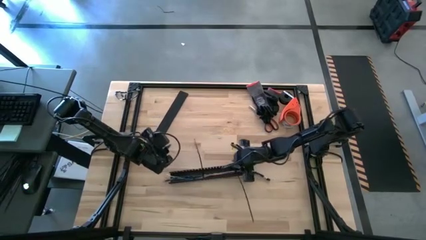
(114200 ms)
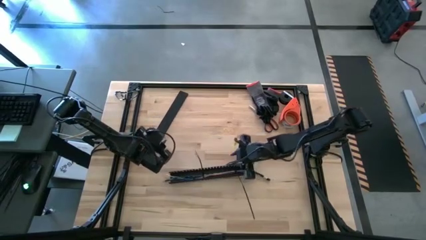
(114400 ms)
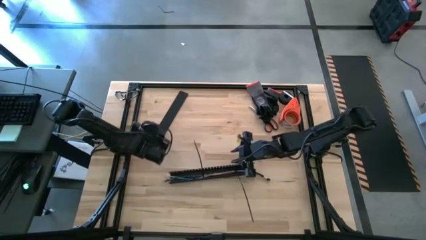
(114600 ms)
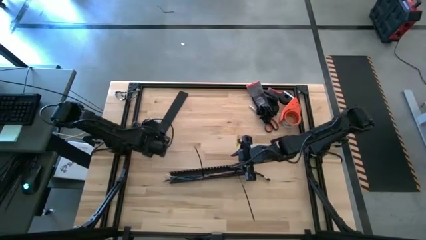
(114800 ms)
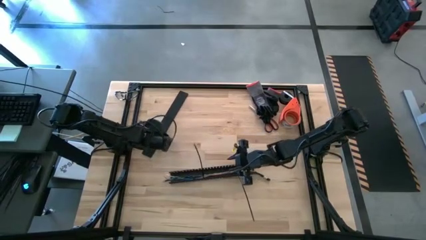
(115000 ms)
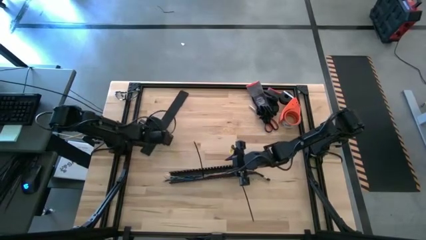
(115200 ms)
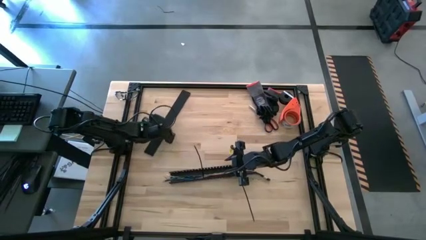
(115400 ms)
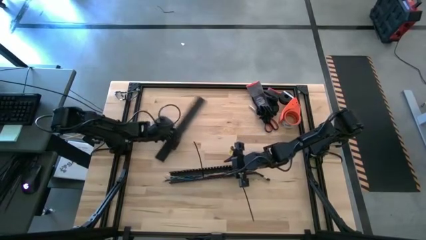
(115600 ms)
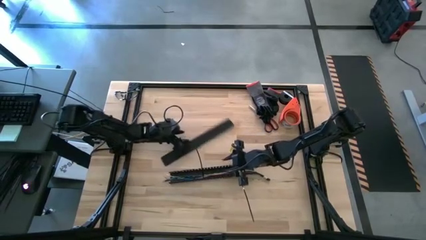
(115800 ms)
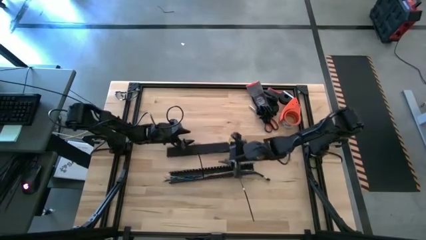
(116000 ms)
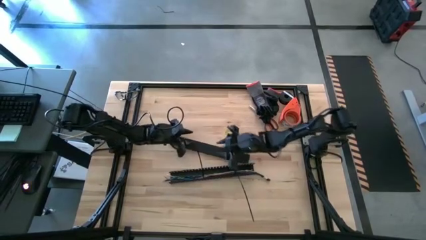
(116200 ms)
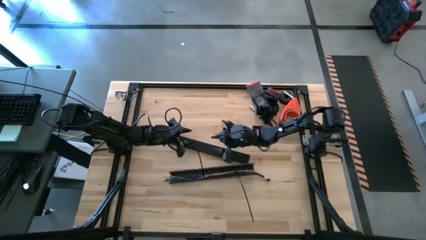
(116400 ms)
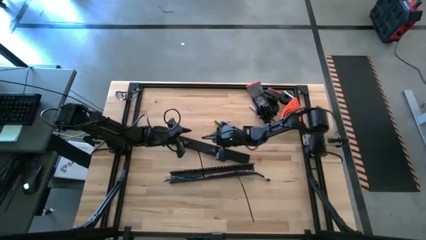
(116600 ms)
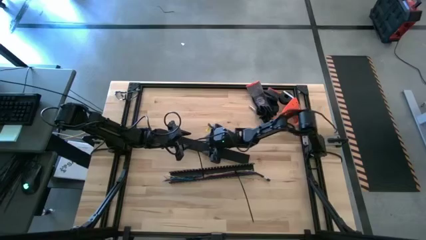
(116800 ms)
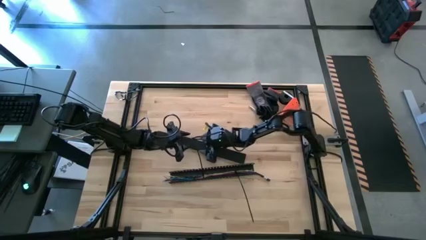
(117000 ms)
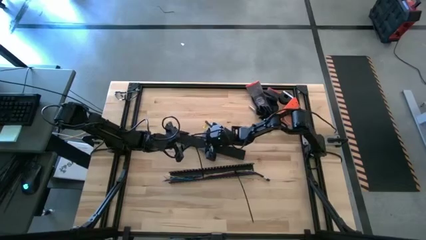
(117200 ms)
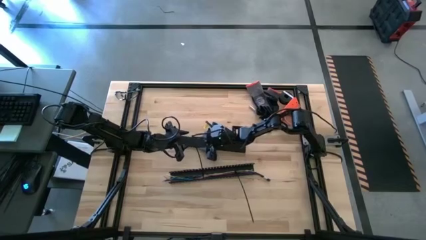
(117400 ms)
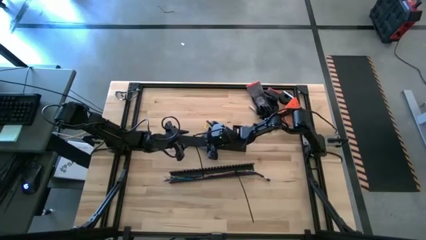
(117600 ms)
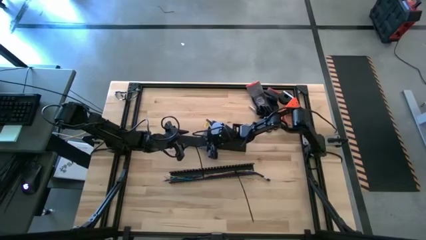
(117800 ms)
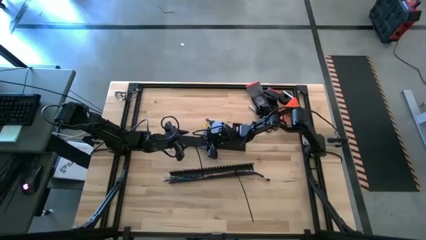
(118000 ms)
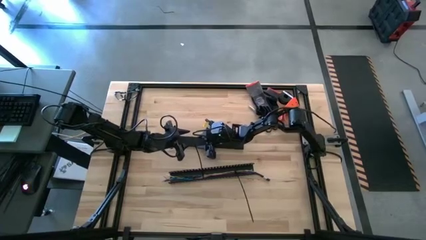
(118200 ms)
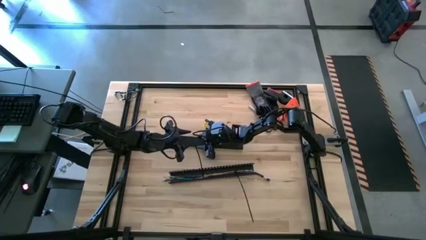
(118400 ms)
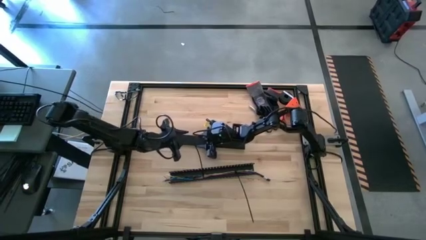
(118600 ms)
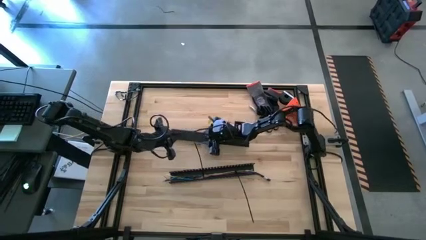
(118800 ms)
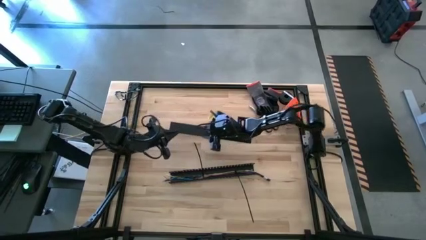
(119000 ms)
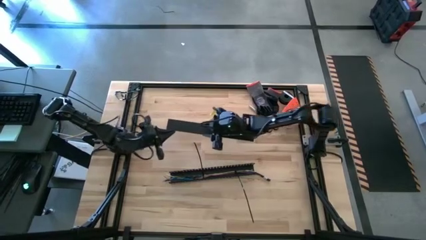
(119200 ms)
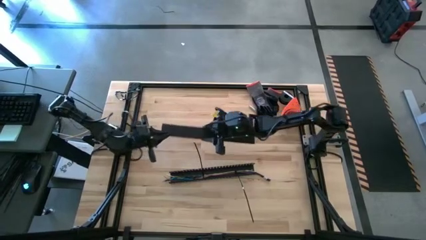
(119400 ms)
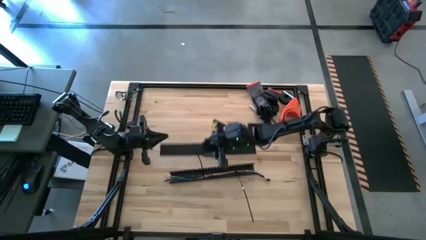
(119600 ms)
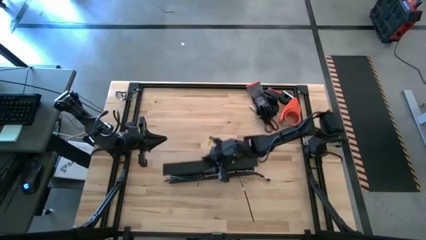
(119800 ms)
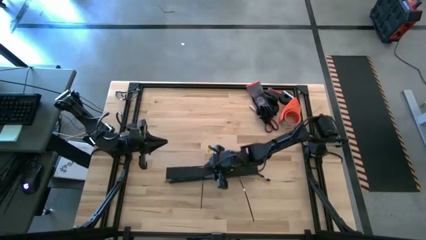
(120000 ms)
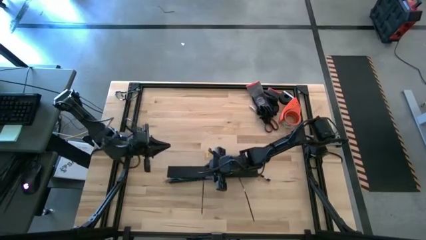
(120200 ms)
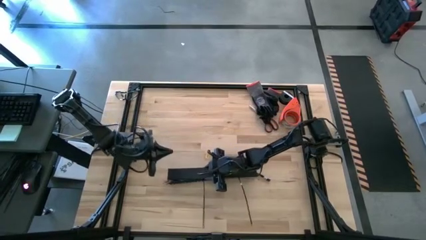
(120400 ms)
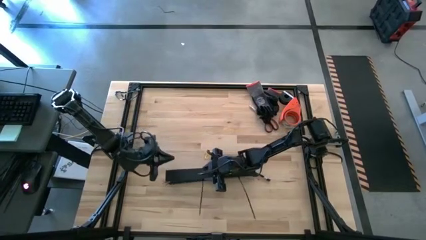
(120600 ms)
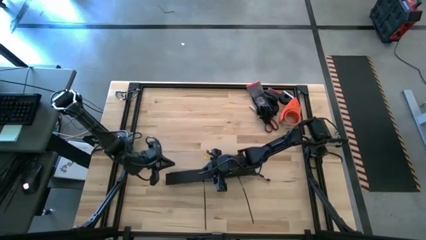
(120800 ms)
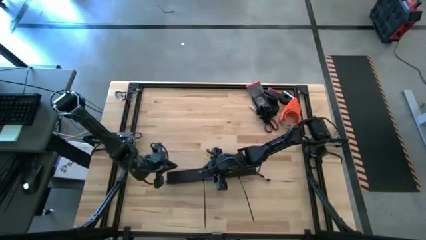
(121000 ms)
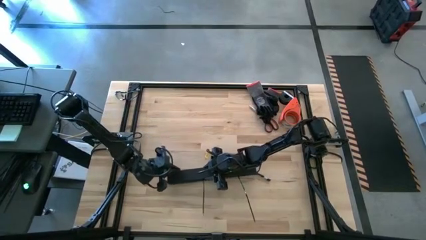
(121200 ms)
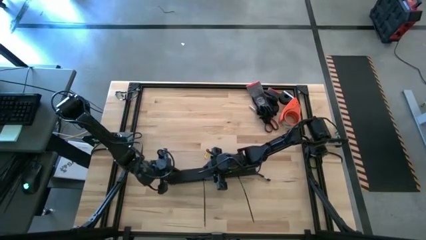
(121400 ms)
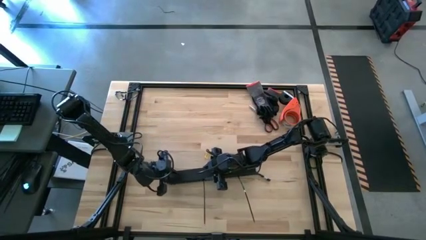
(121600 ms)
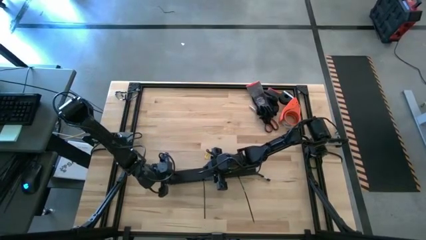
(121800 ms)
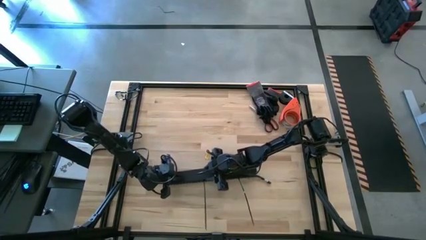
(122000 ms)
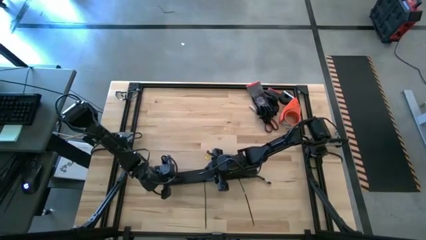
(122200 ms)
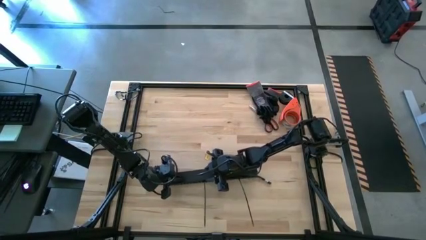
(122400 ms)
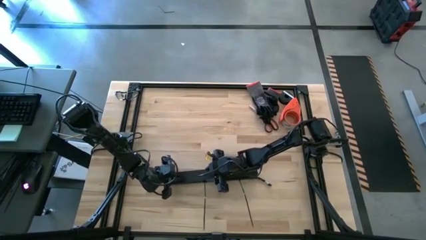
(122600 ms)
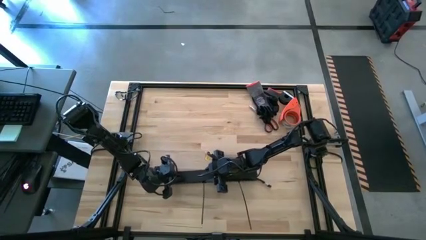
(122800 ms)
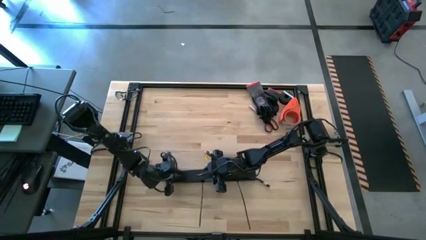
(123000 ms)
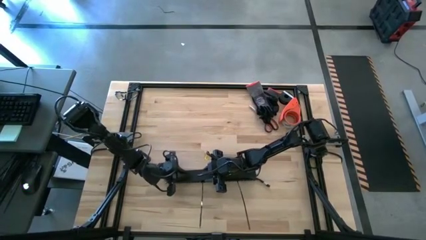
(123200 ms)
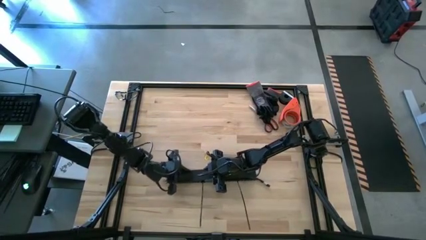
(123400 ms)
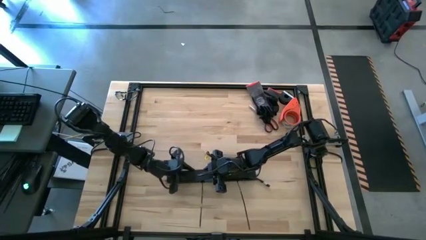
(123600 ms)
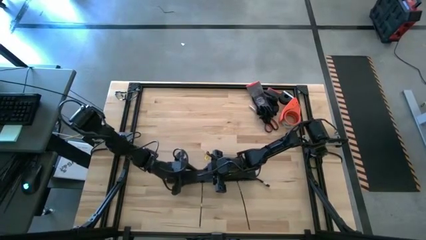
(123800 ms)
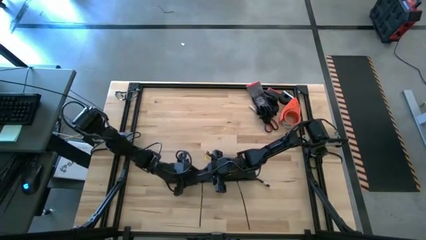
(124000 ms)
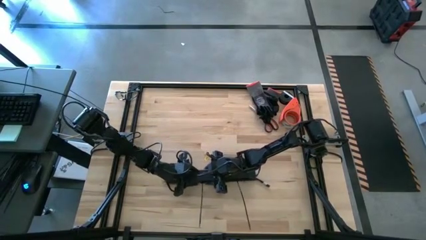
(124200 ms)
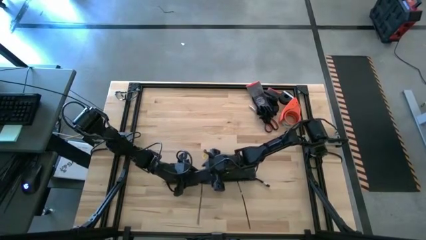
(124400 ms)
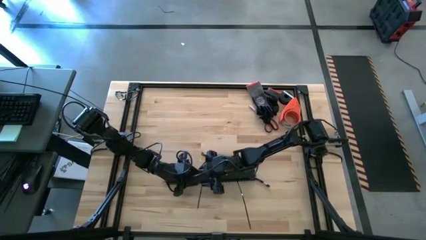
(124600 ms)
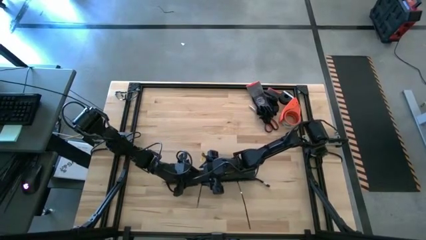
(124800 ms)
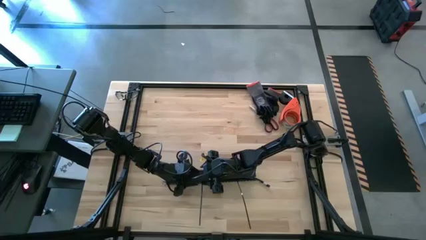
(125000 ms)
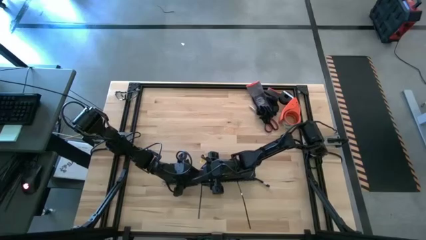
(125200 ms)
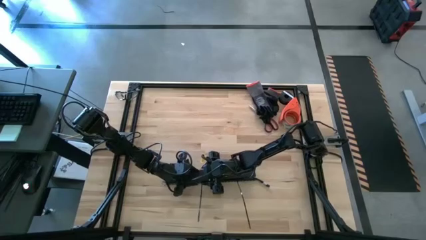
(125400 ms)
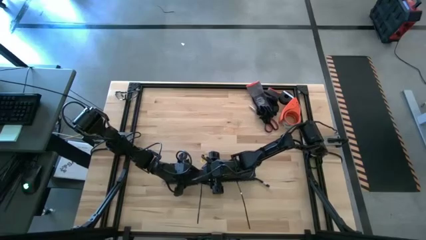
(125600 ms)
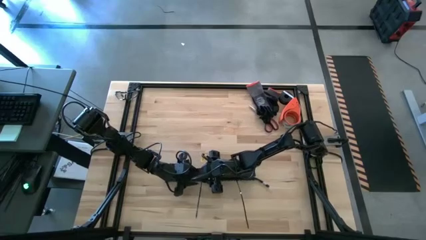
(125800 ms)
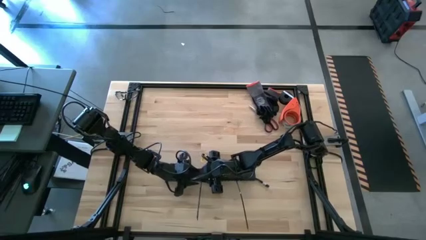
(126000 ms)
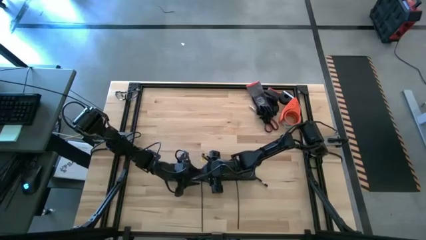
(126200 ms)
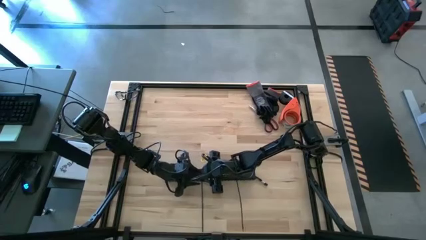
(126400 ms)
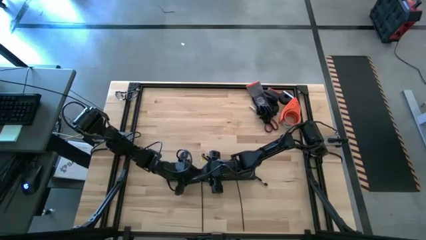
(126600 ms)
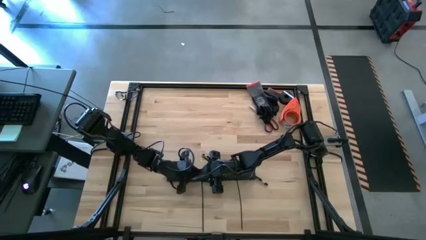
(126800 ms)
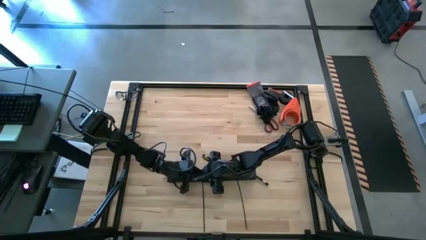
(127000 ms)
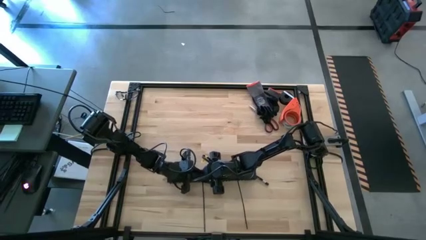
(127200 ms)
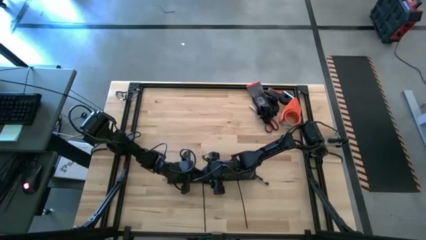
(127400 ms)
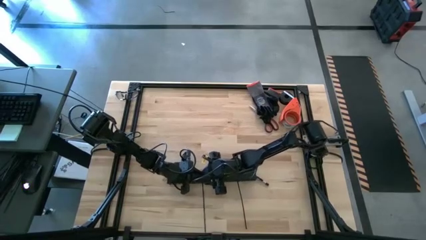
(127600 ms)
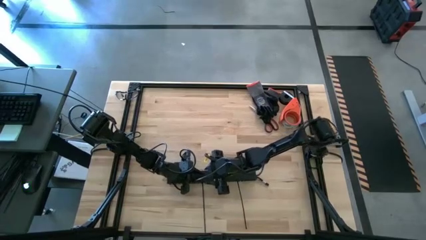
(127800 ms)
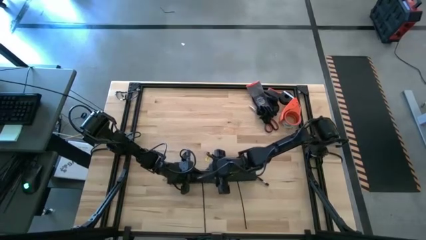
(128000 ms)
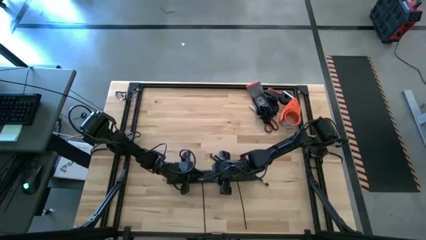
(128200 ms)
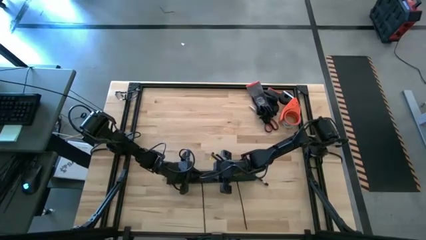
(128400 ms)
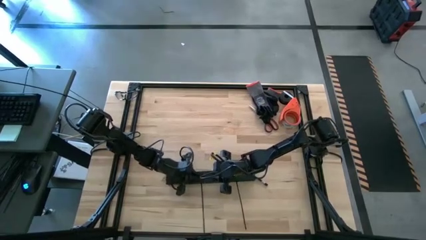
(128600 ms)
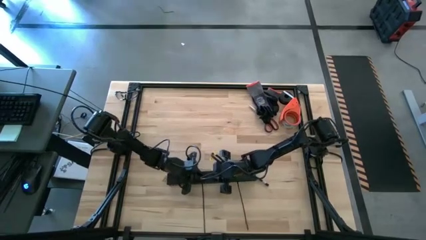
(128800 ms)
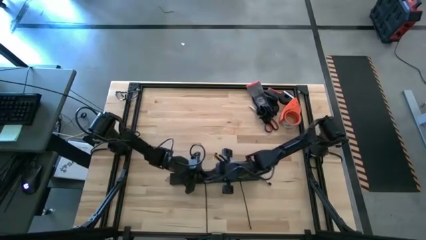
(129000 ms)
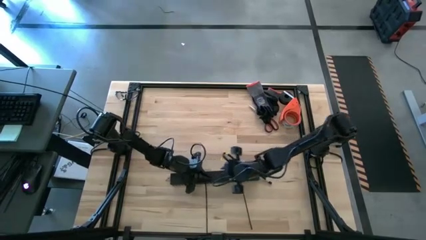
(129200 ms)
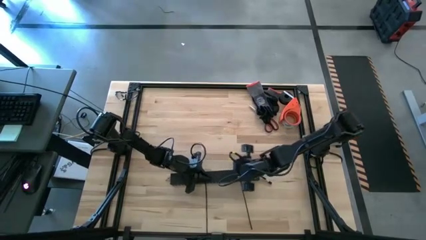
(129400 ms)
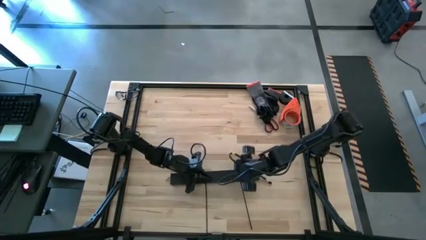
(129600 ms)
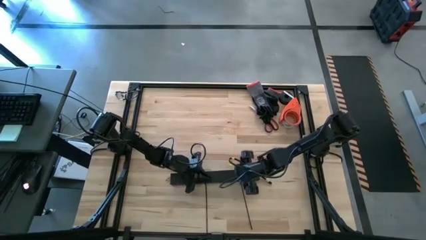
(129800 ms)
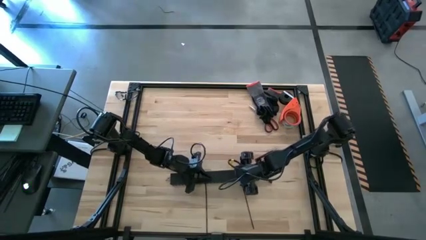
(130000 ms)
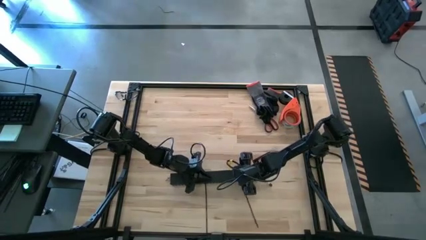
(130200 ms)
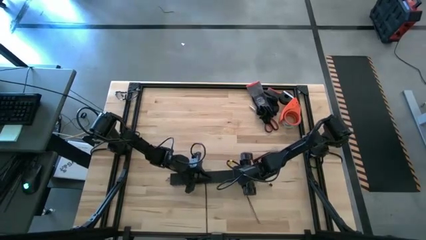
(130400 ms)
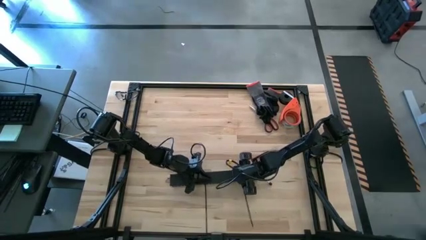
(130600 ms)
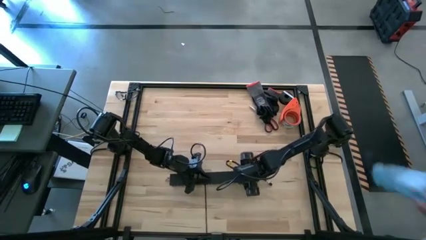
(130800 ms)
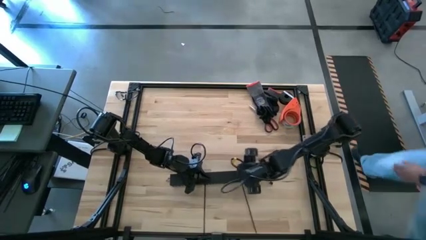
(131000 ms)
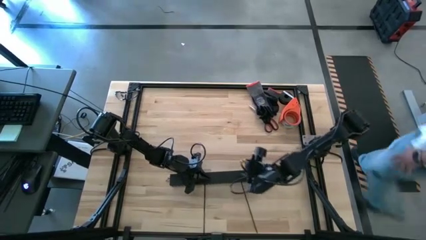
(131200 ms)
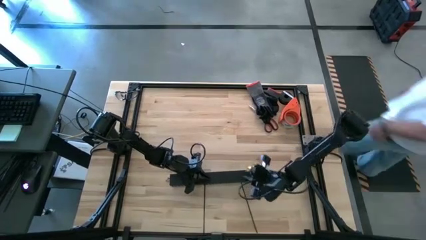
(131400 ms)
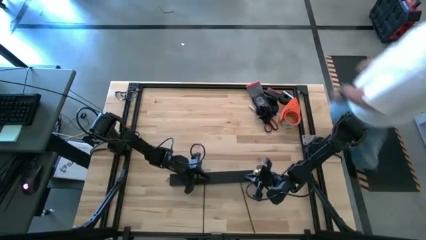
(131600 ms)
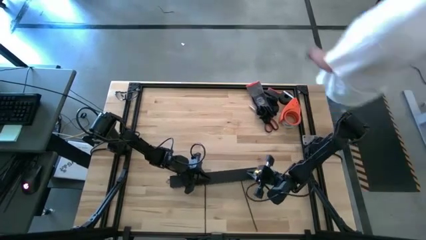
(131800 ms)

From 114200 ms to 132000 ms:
Task: Ziptie cables
Close the black cable duct
